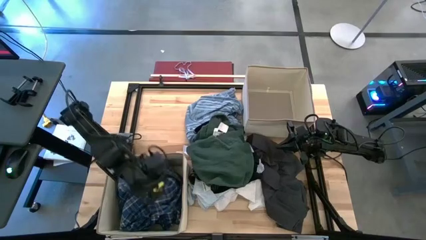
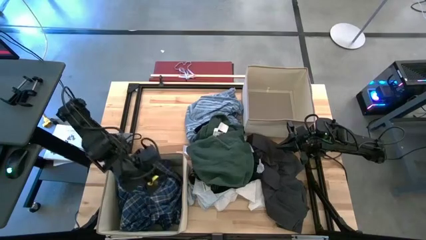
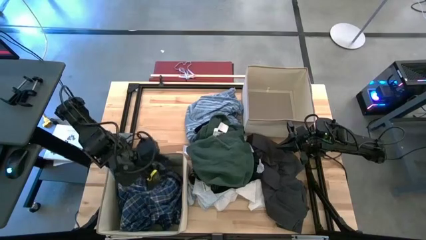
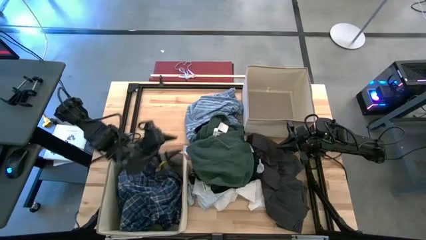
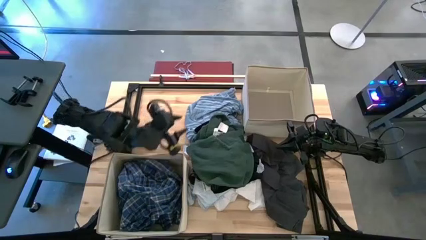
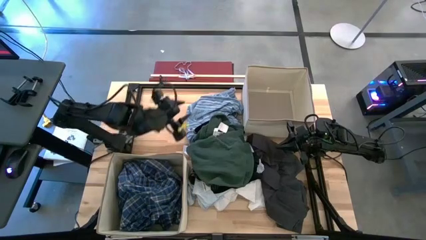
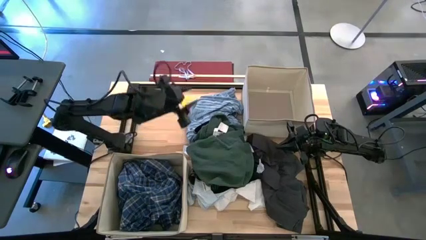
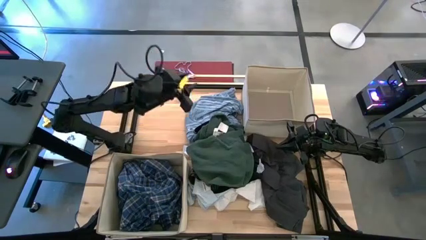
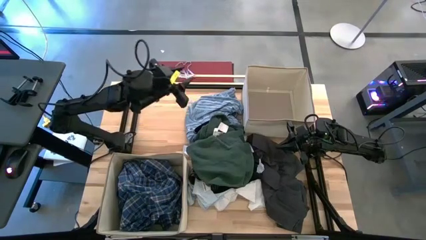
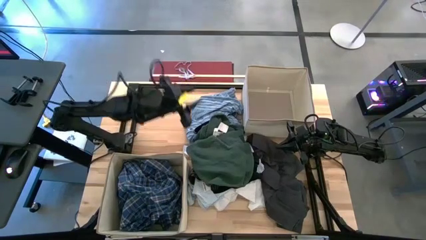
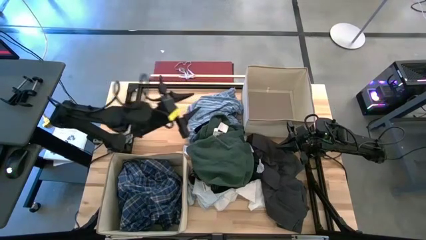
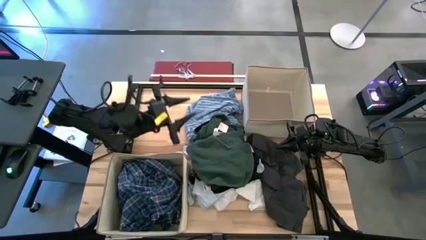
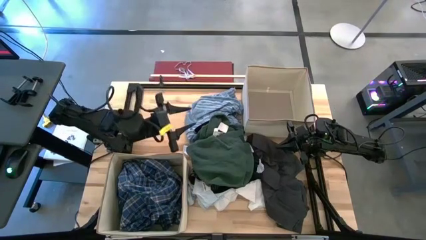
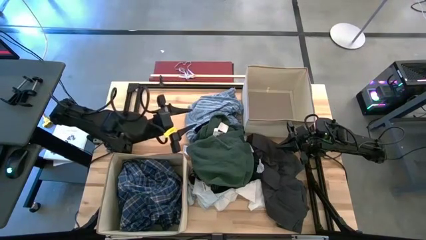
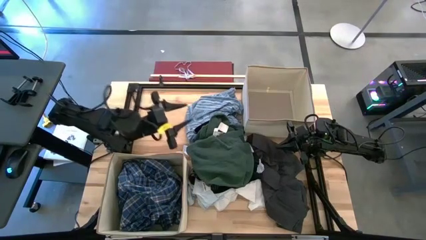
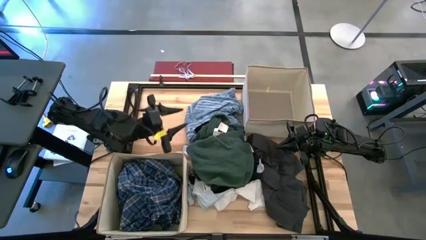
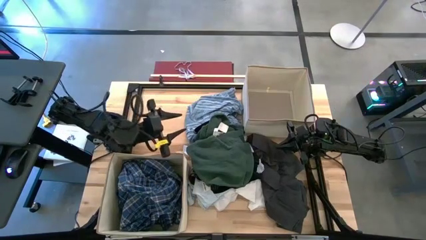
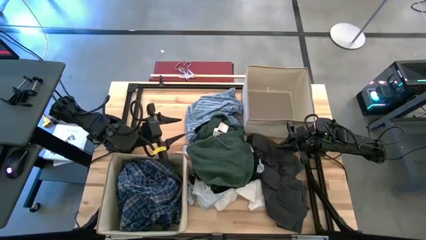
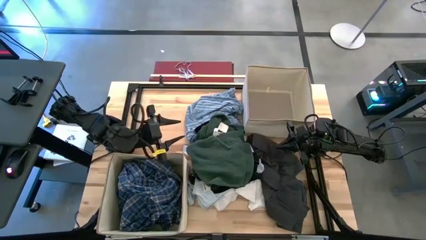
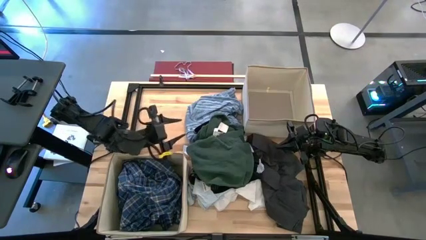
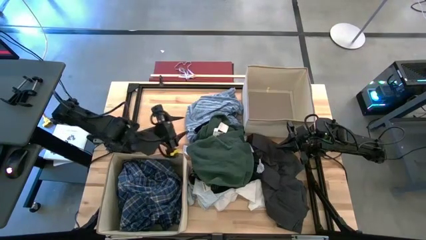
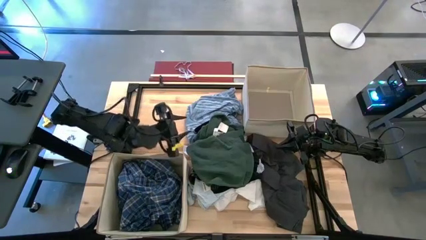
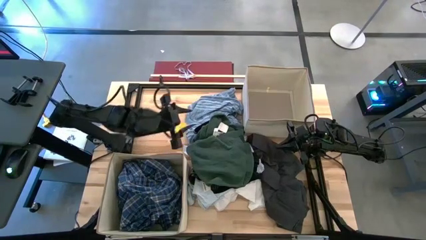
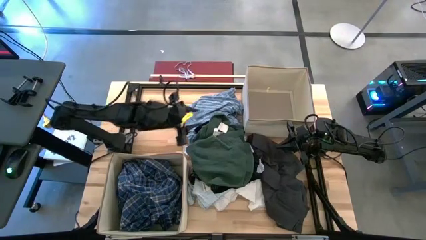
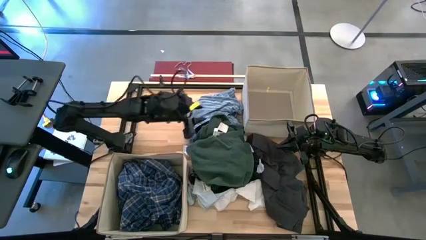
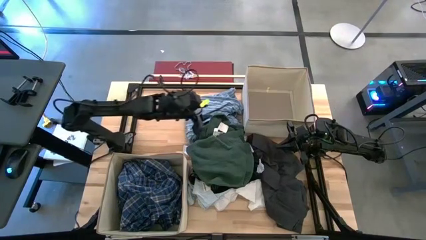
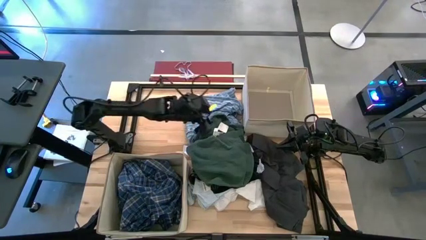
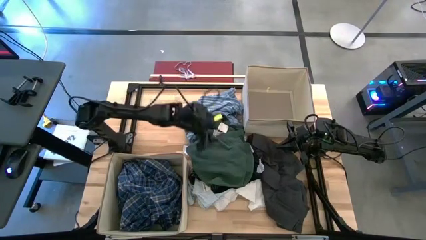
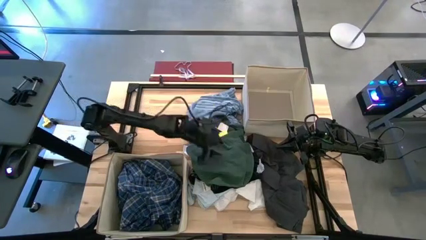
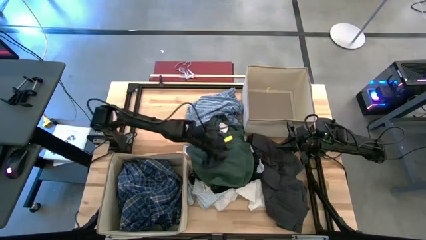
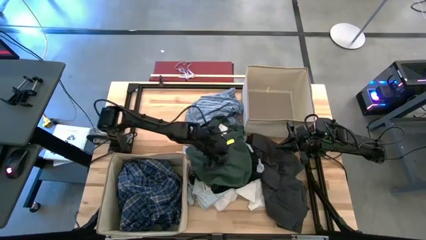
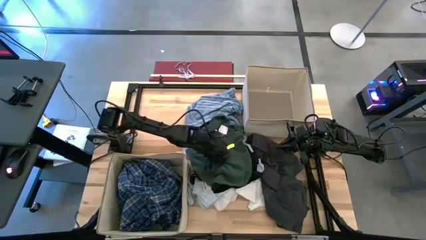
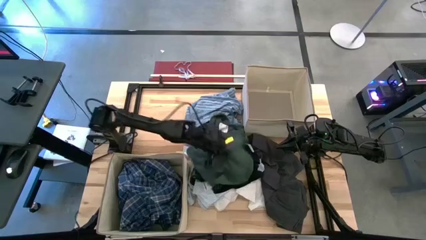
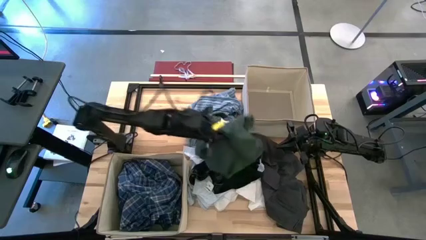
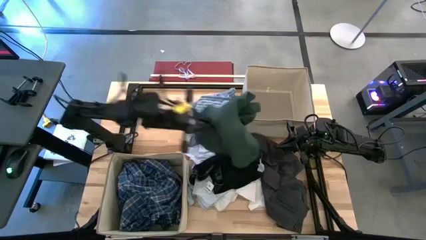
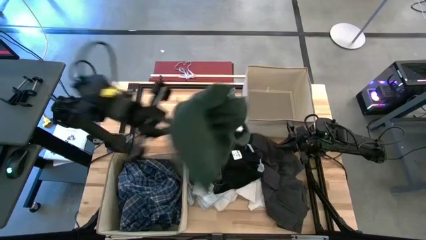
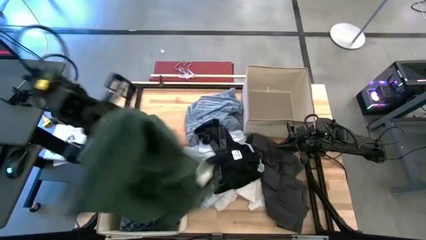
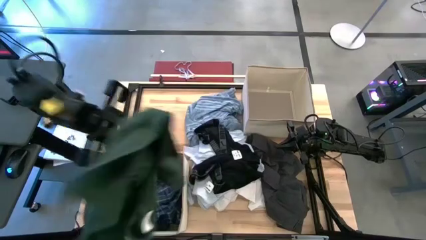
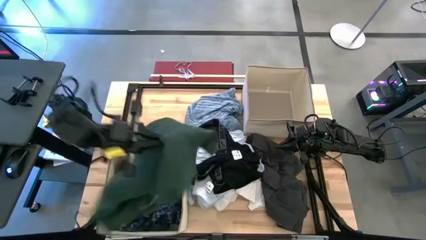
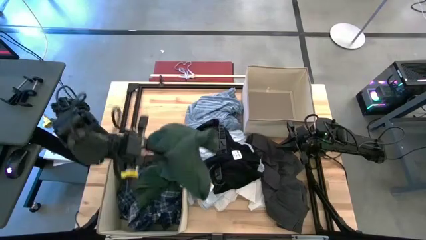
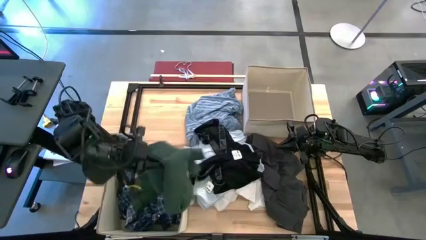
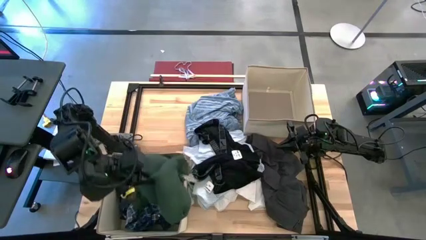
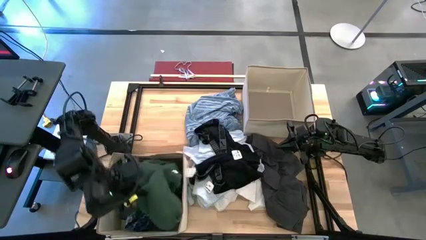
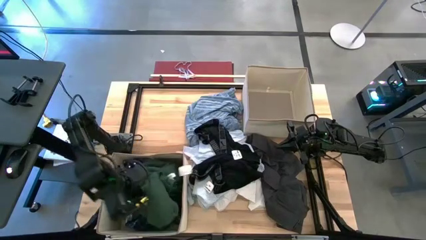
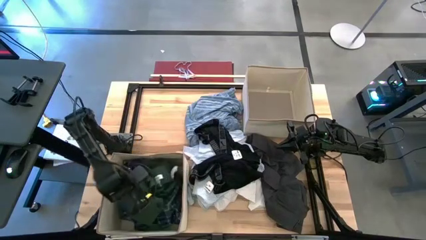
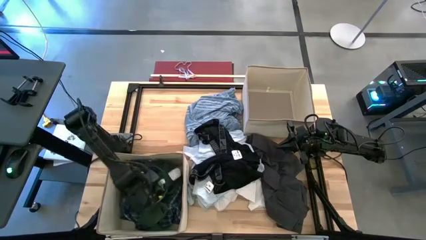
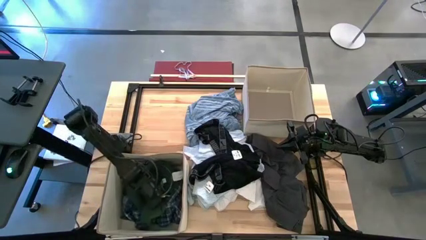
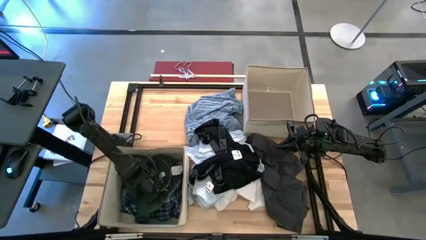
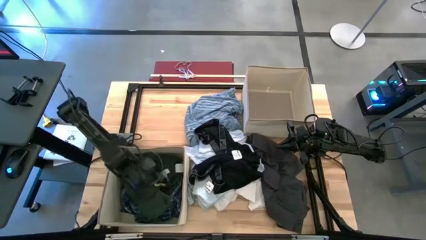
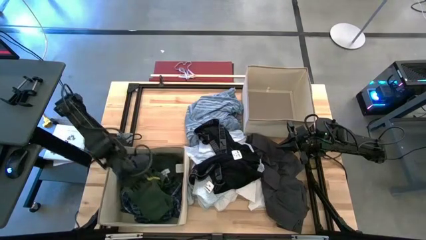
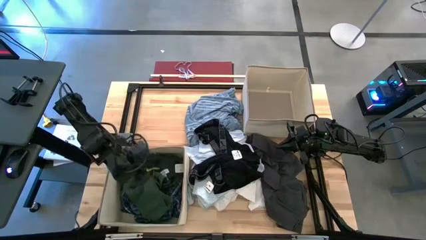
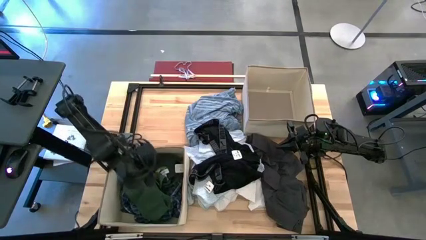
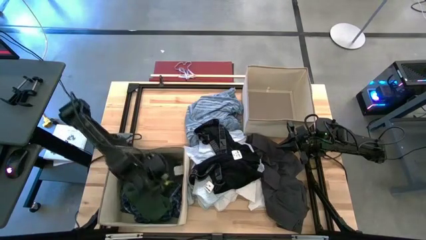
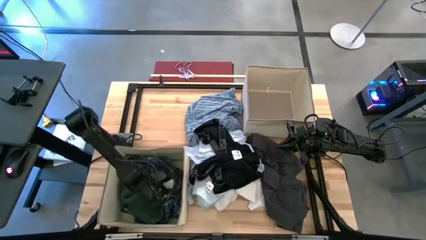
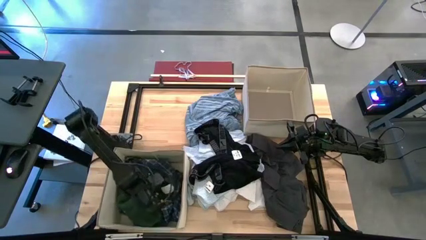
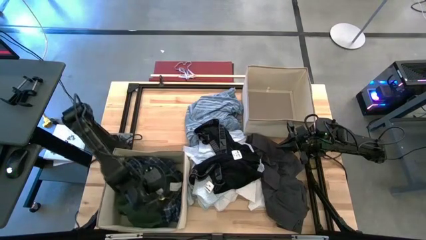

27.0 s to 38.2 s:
Task: Sort clothes
Put the green shirt into the bottom laundry organizer
